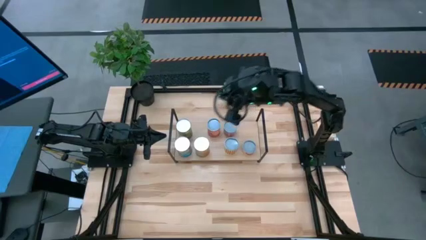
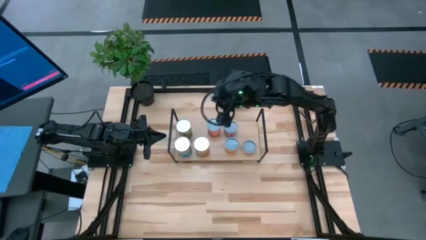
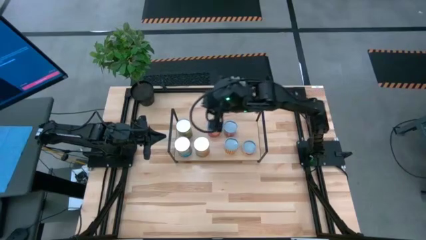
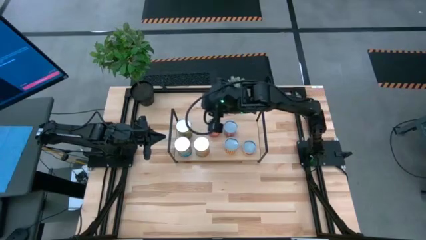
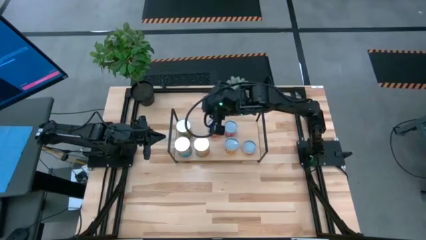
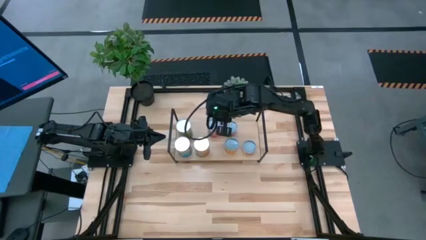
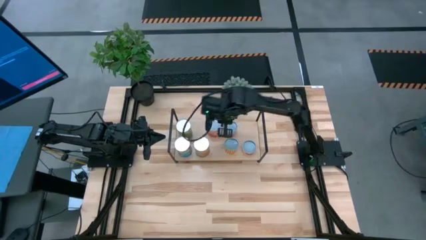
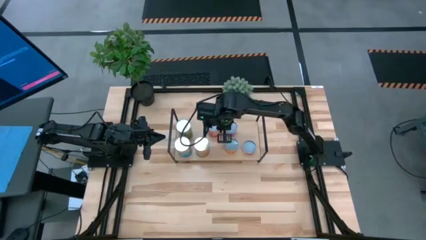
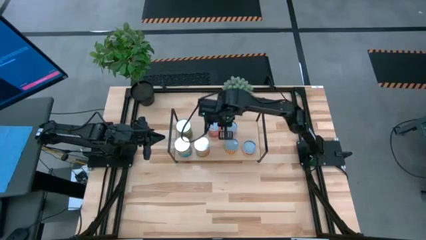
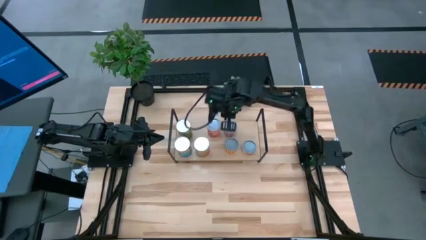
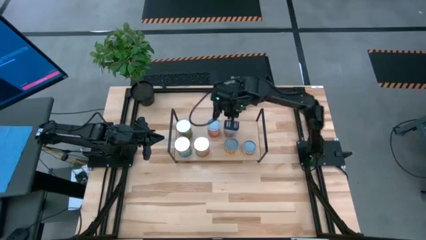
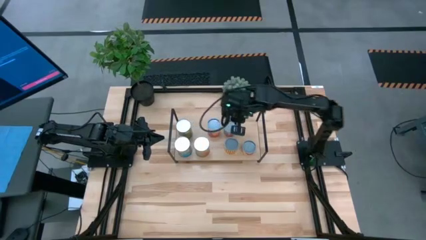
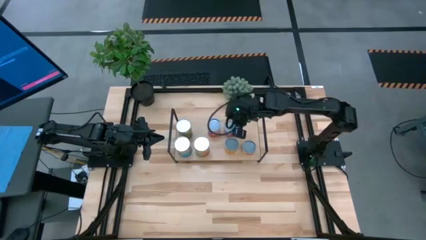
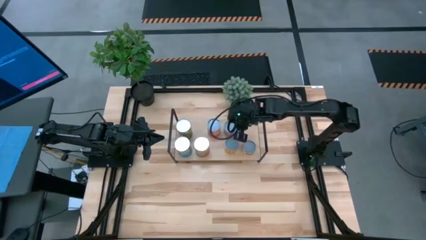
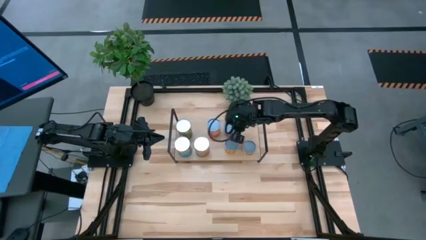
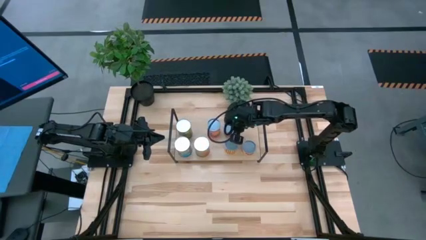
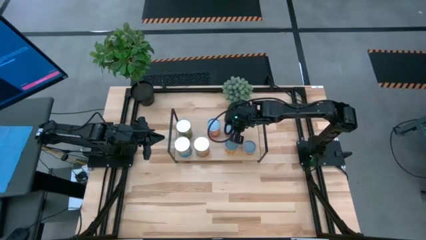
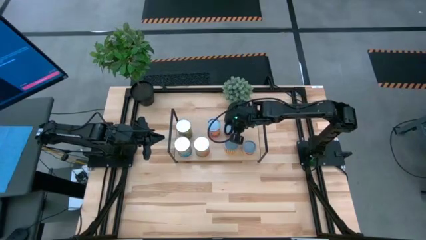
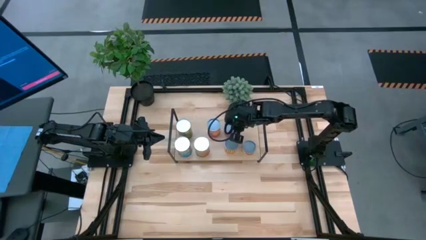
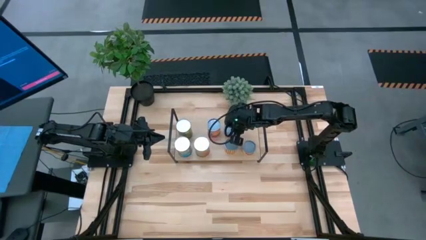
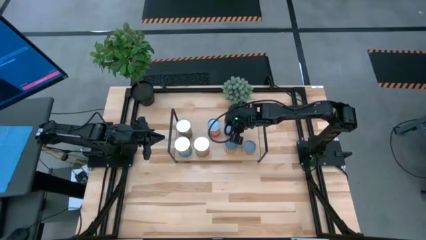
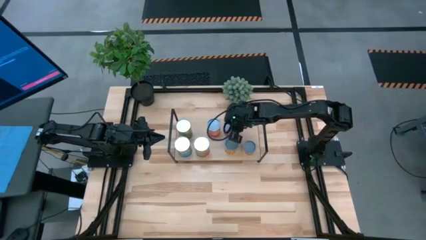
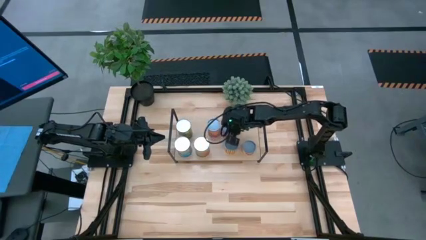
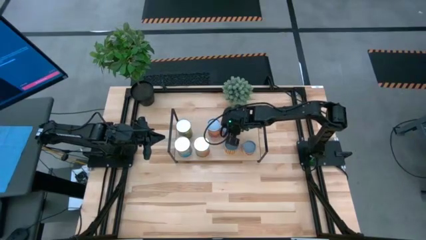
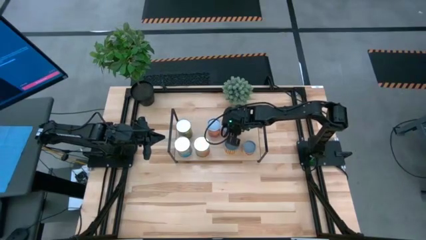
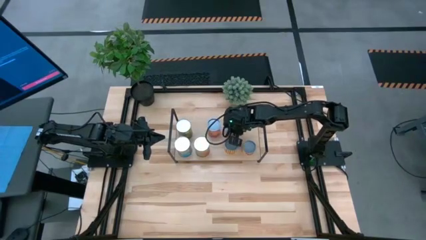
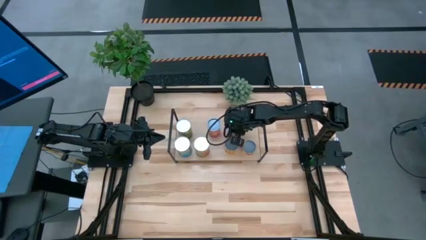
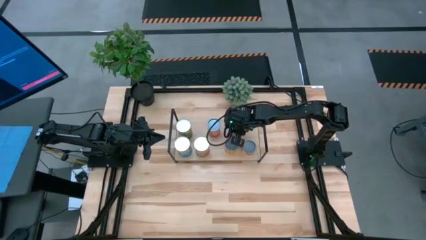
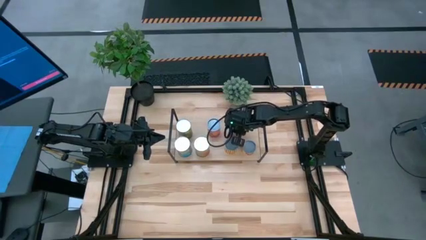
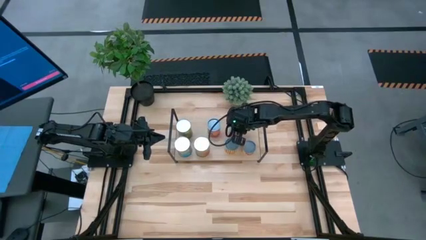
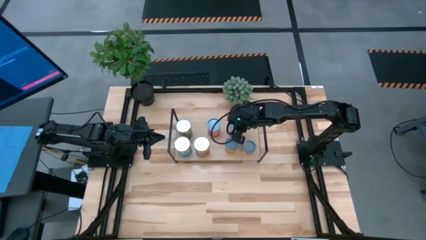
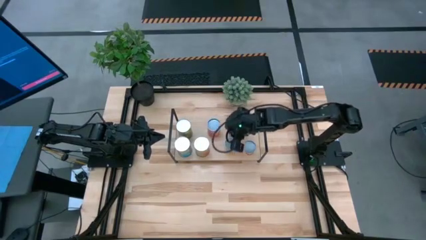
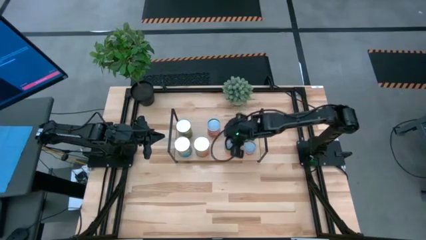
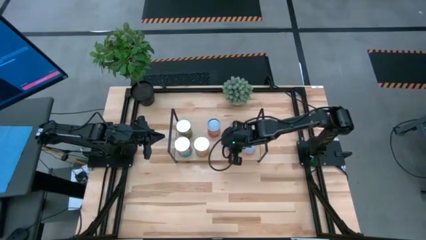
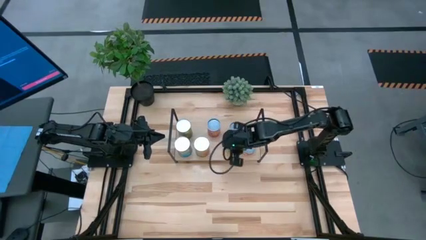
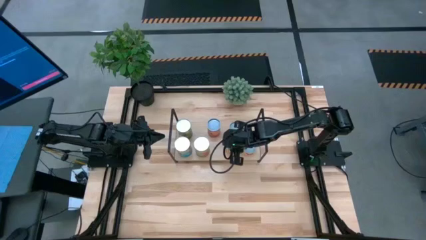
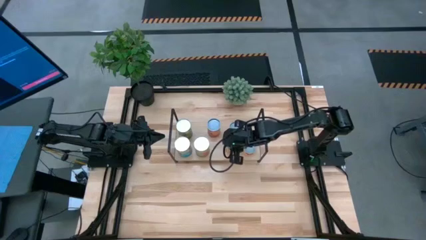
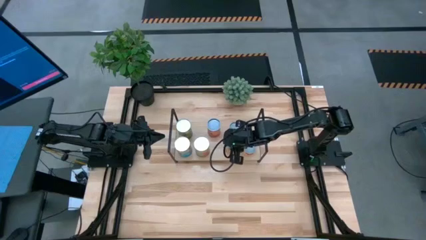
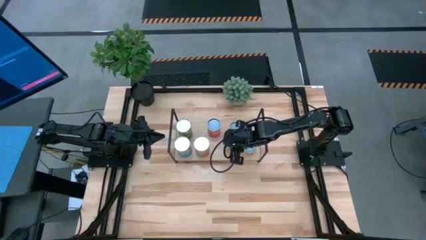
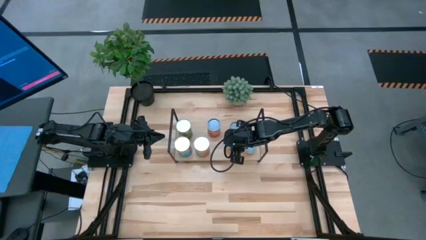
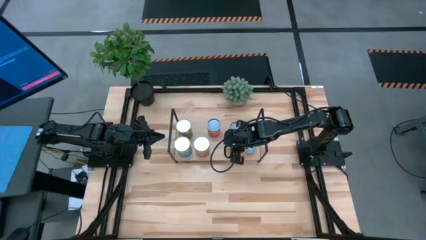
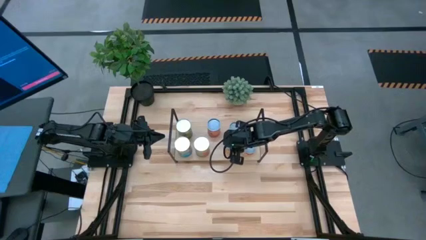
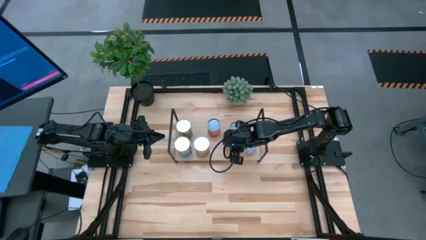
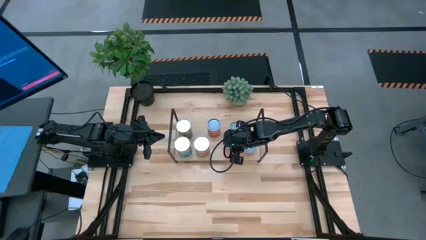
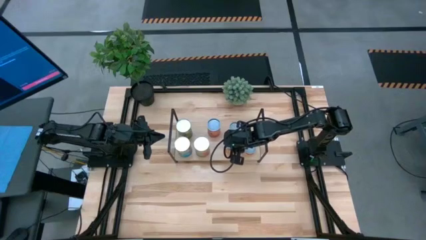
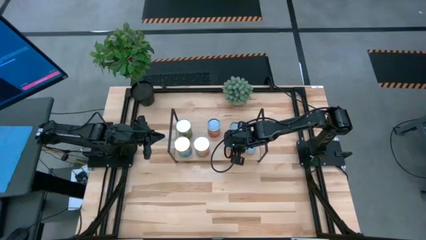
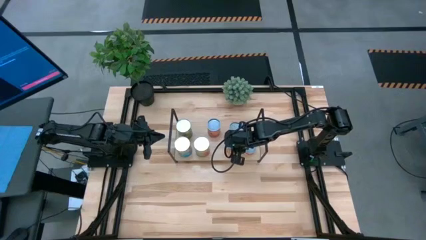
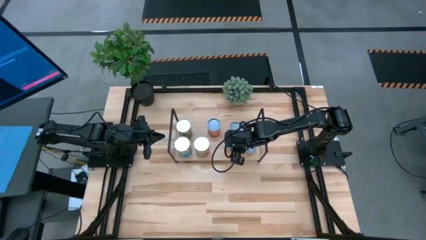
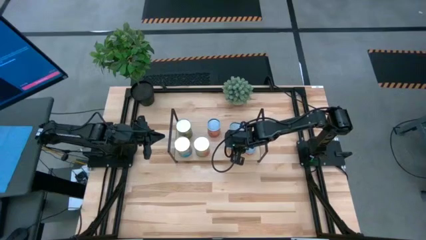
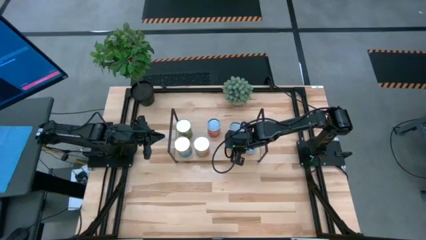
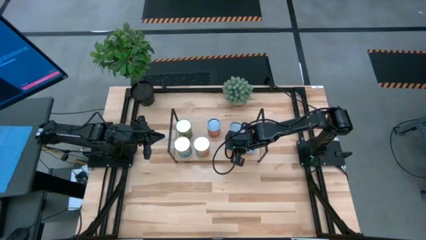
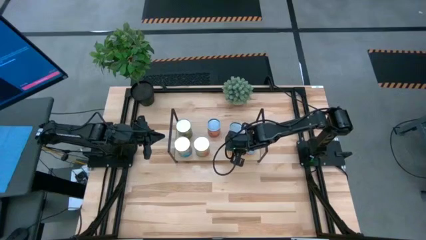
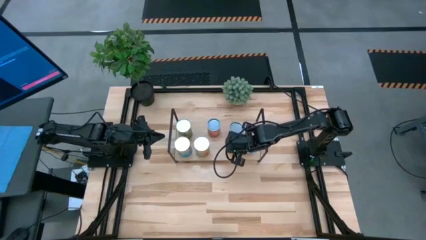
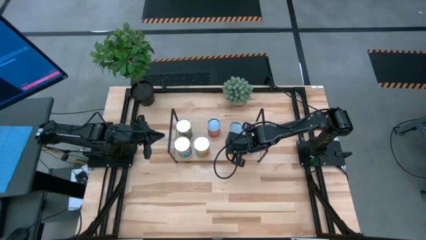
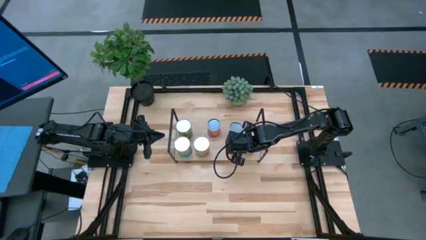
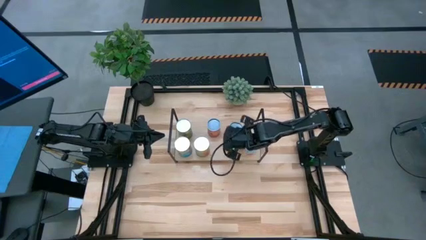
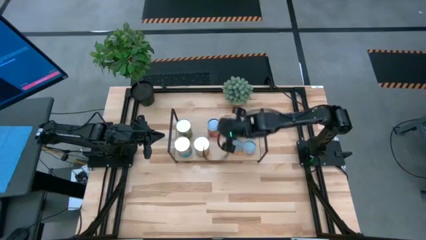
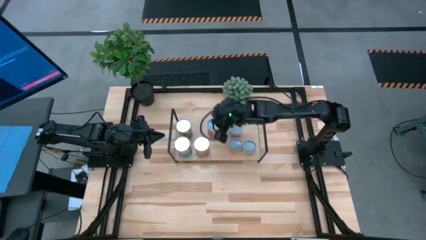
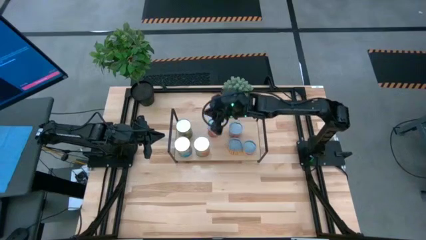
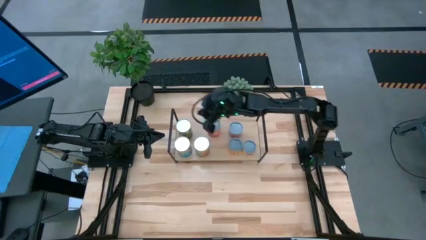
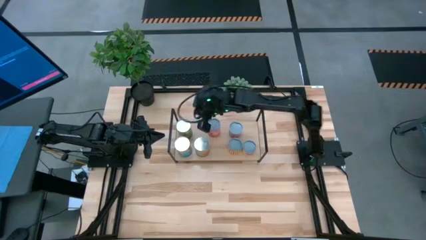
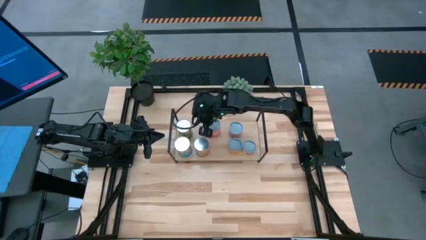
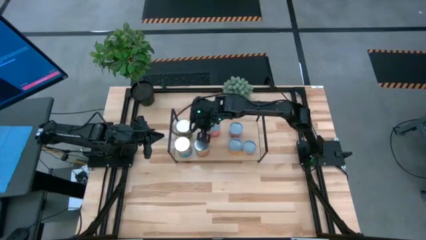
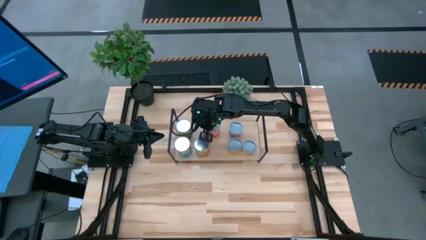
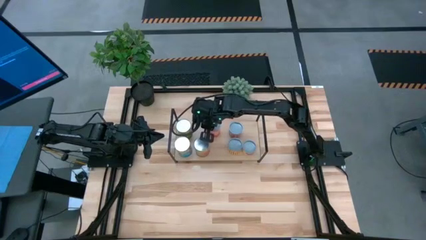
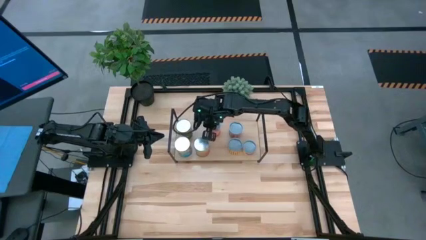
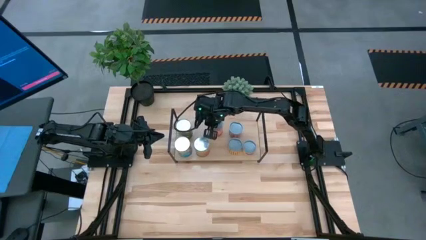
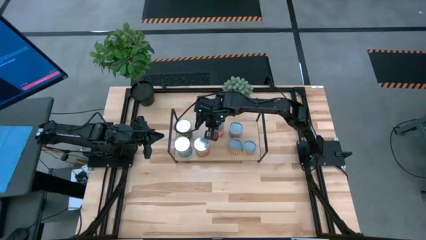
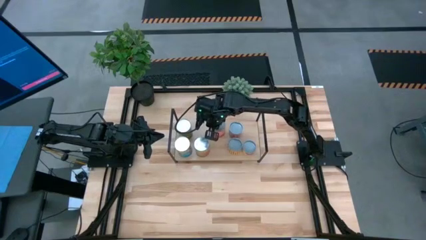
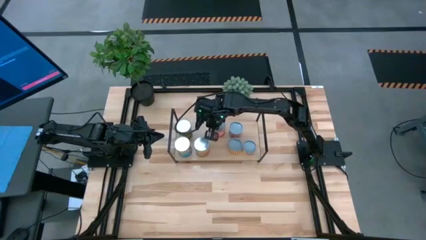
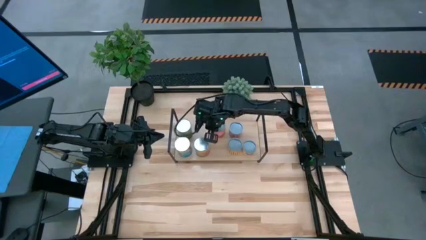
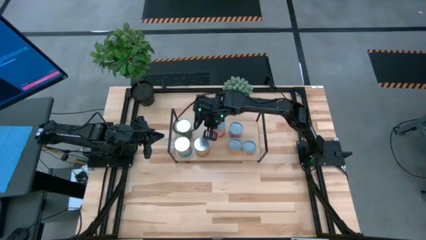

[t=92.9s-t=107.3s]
Task: Pick and place cans onto a shelf
Adjust the canned fruits and vegetables on the shelf
